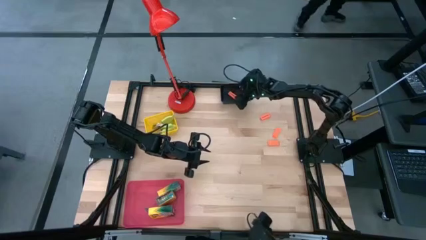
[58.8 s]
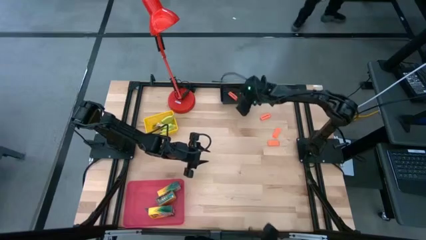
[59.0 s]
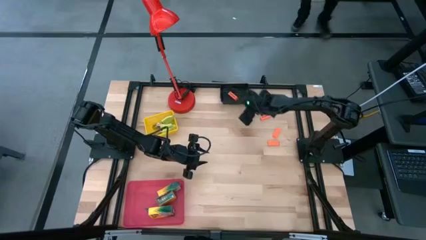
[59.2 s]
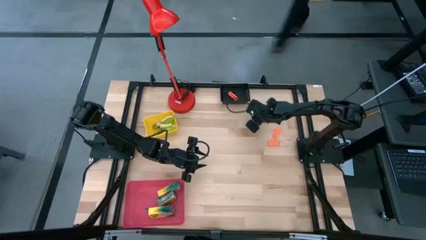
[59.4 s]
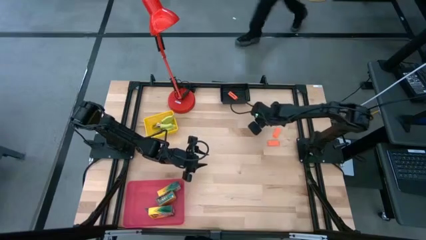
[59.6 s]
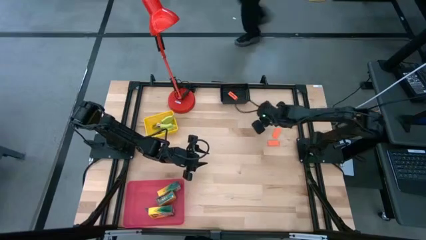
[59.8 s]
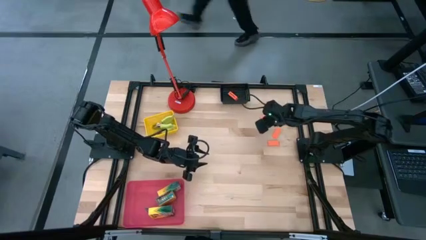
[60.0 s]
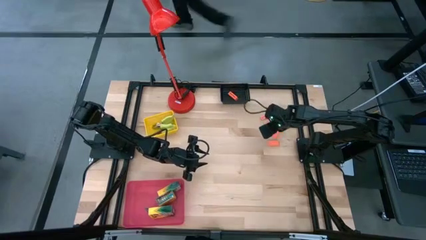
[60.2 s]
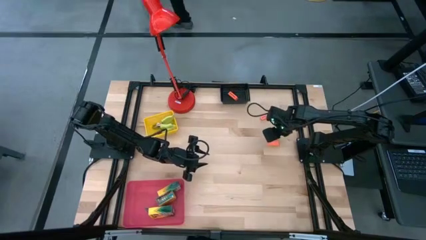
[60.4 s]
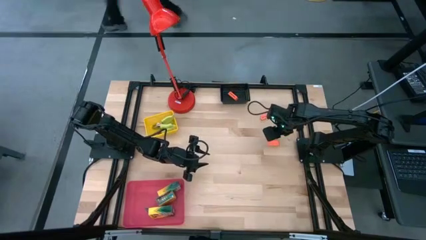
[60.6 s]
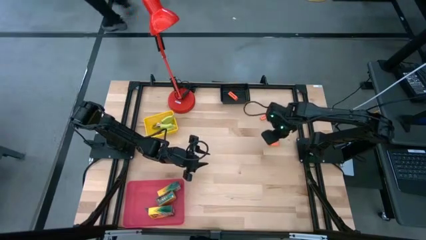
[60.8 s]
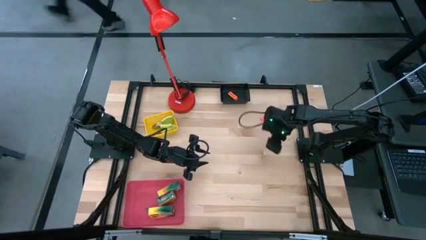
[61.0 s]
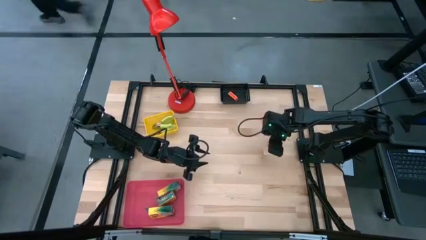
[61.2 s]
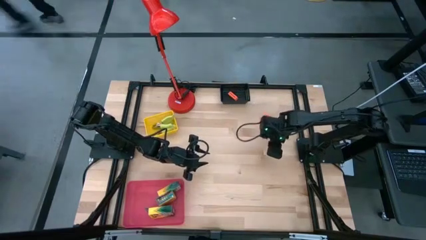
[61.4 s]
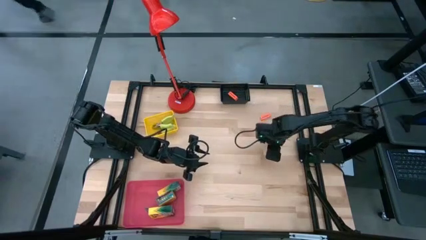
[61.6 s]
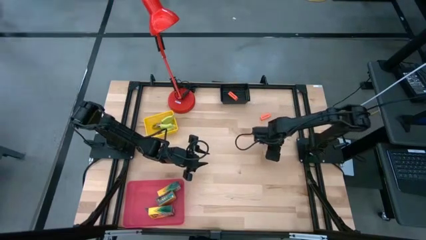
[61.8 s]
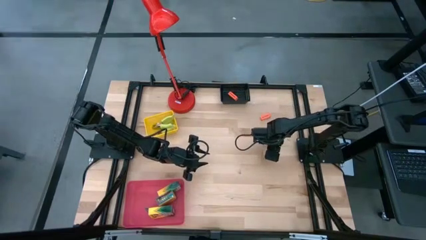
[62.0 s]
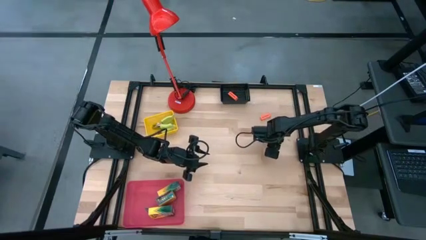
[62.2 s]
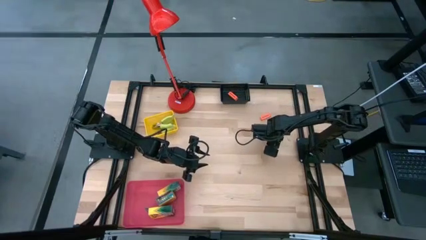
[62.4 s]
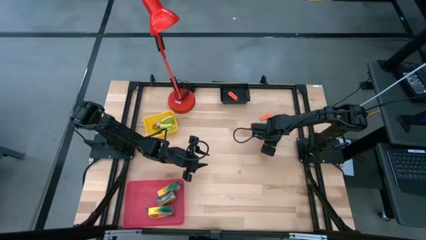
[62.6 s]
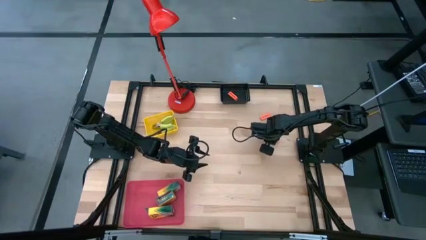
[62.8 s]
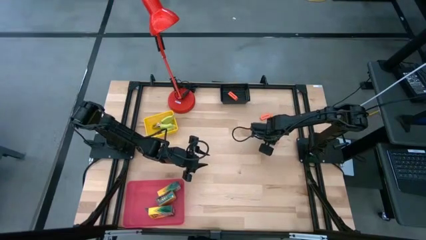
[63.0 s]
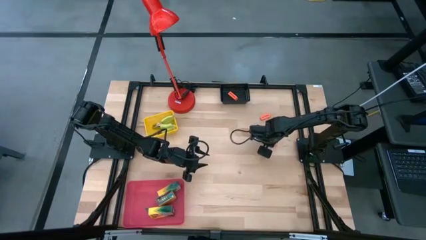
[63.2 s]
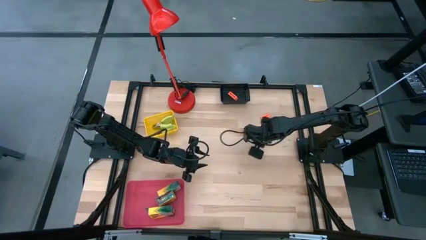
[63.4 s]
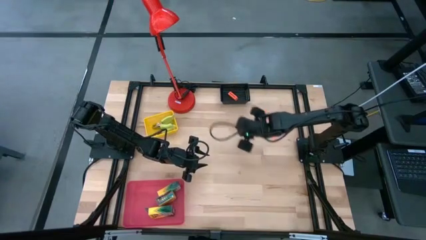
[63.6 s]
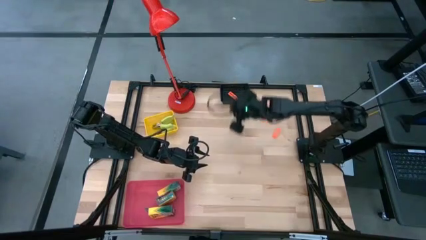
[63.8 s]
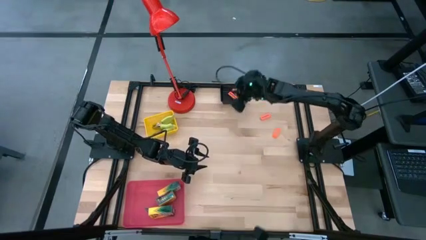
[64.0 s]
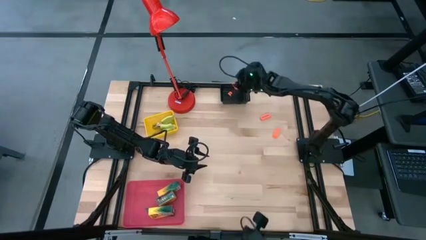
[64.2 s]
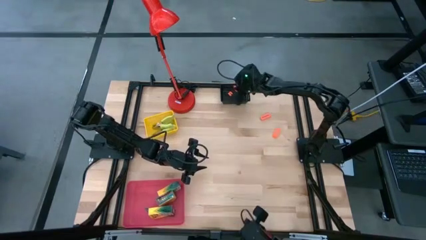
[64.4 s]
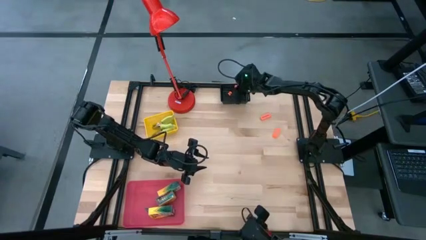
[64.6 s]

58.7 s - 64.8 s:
Task: Pick & Place School Supplies
Put the bottom eraser into the black bin

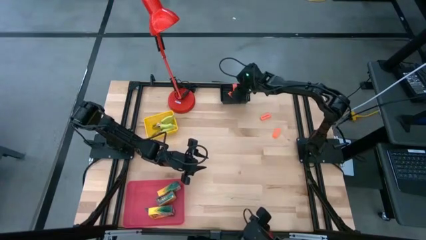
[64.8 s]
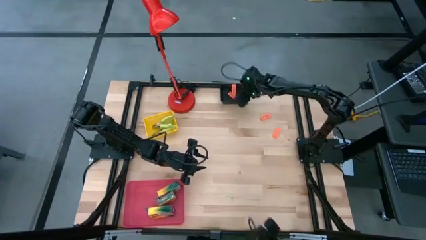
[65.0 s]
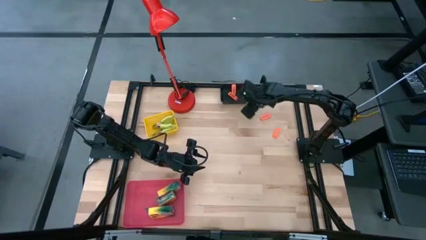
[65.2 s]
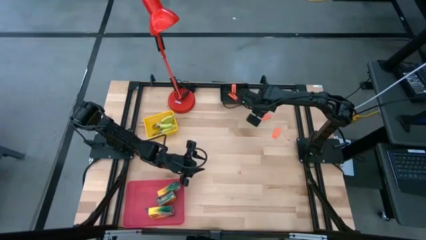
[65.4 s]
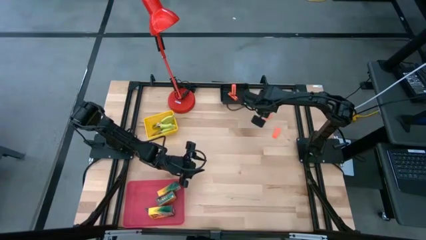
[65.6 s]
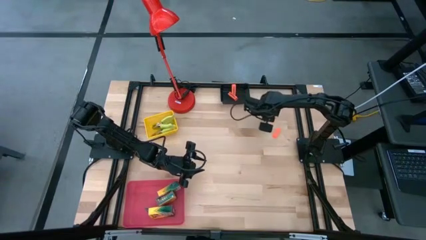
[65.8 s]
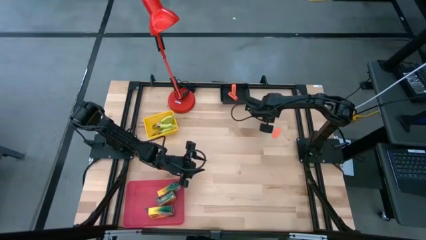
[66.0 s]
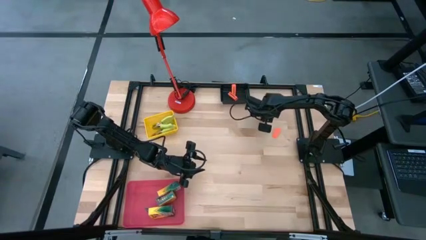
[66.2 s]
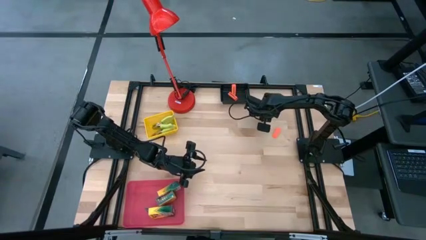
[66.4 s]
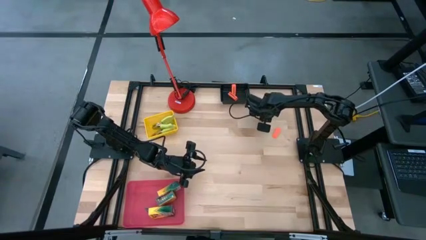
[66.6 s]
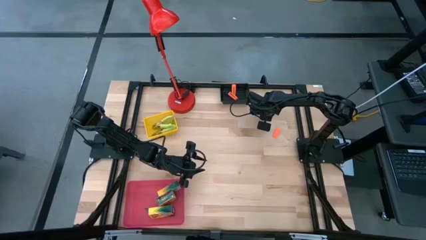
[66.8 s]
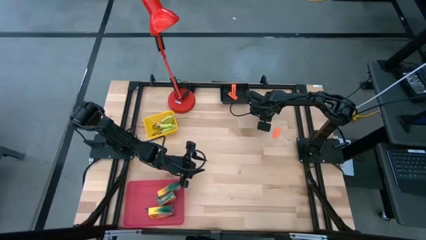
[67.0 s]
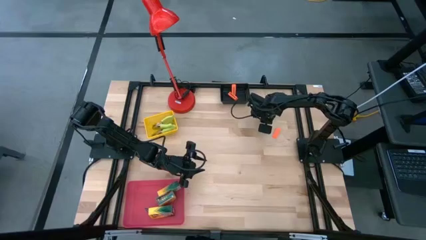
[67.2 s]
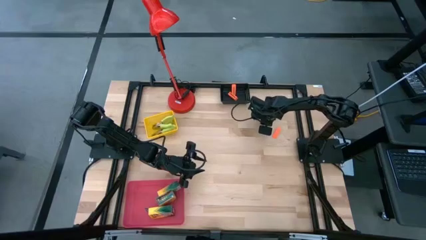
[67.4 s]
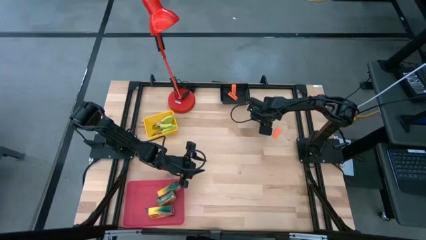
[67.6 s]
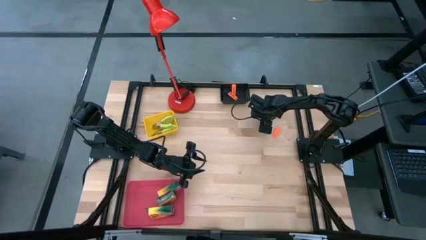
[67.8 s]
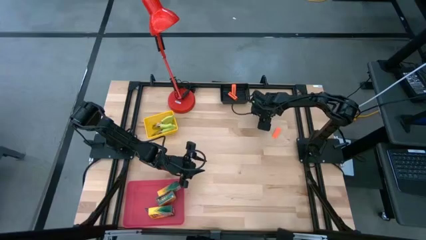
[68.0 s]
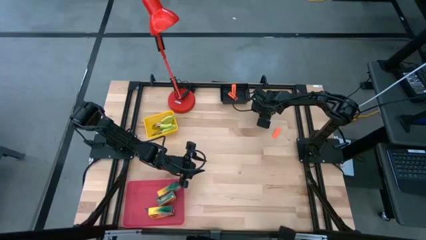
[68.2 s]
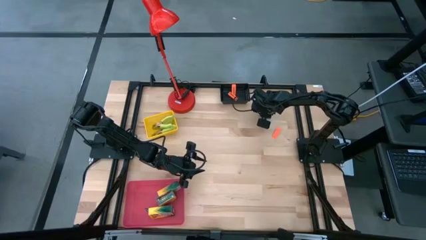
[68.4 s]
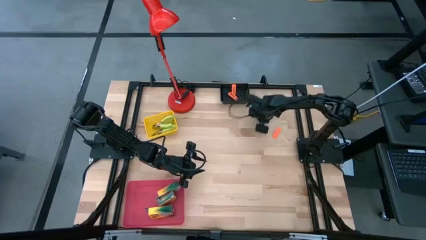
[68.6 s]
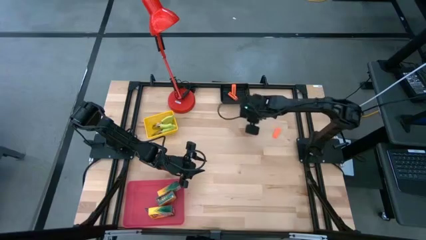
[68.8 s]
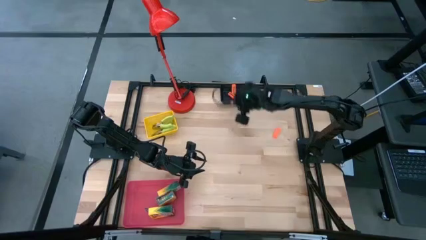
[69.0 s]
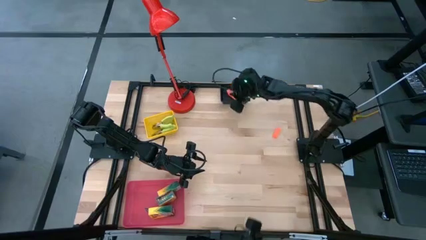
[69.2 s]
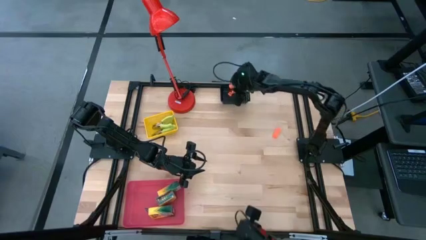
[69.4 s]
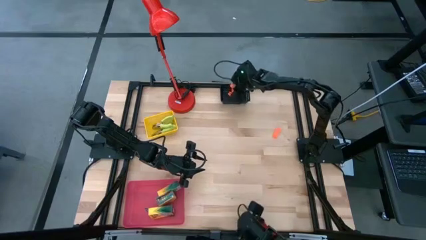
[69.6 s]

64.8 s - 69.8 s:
Put the top eraser into the black bin

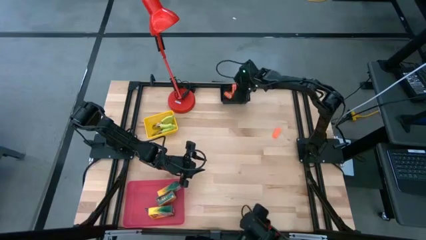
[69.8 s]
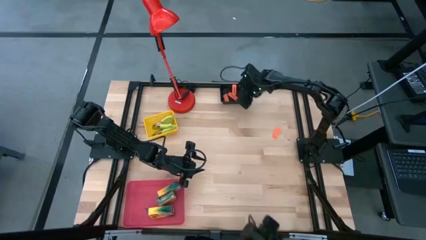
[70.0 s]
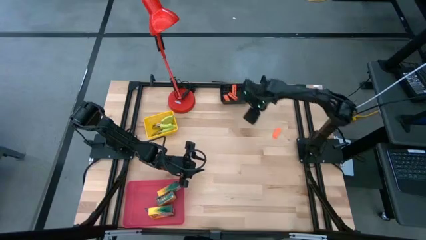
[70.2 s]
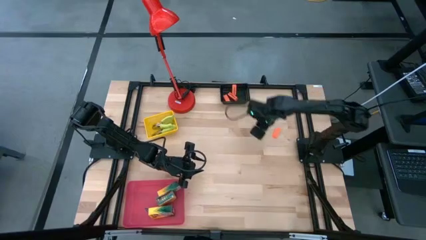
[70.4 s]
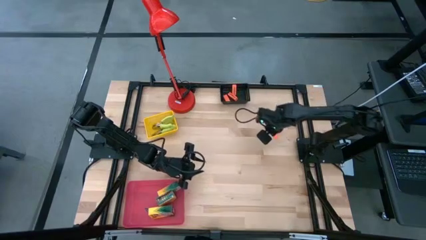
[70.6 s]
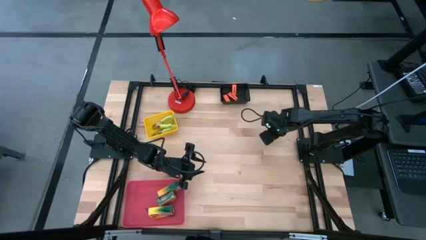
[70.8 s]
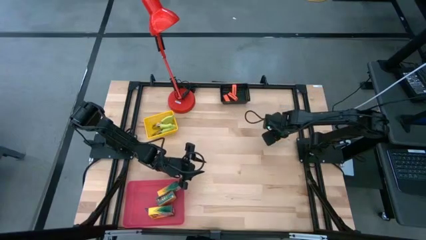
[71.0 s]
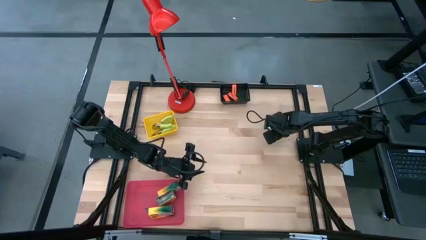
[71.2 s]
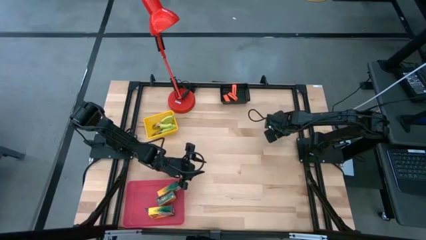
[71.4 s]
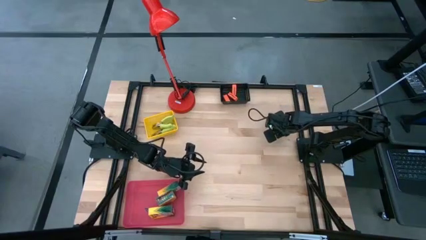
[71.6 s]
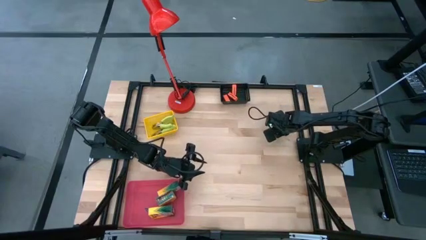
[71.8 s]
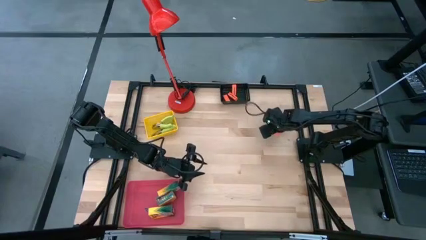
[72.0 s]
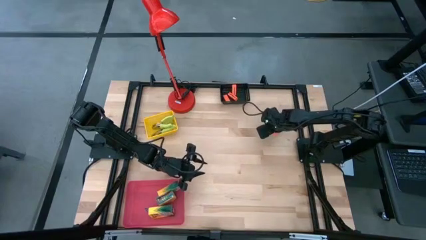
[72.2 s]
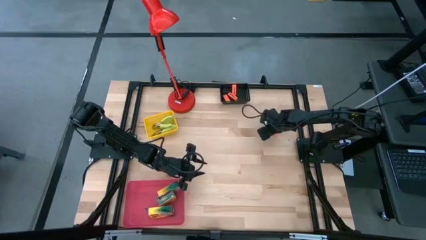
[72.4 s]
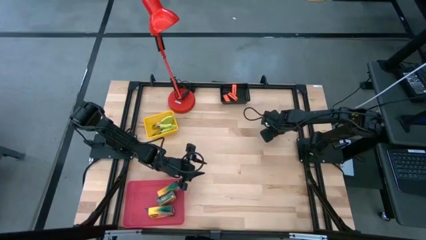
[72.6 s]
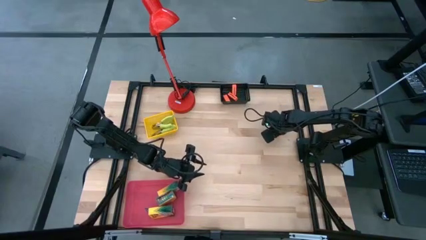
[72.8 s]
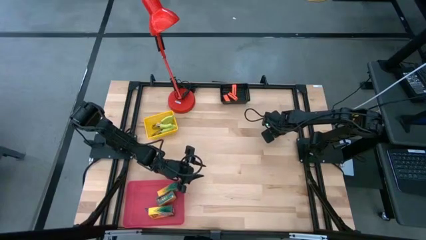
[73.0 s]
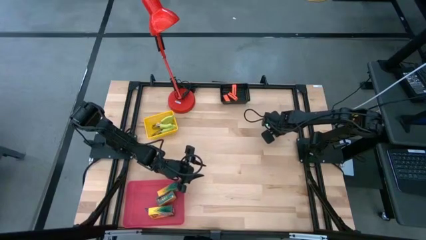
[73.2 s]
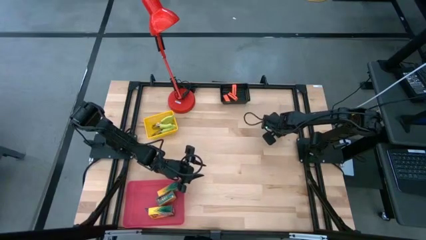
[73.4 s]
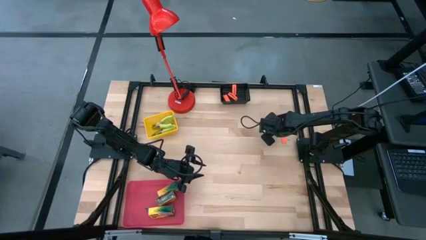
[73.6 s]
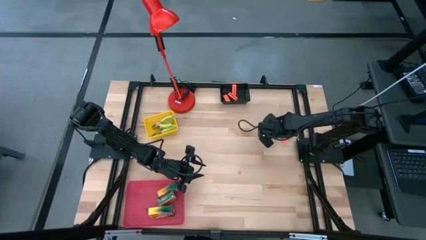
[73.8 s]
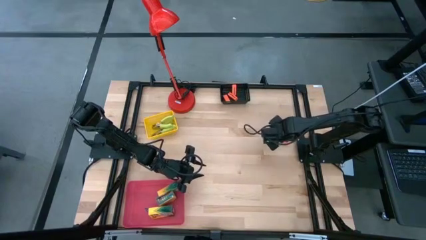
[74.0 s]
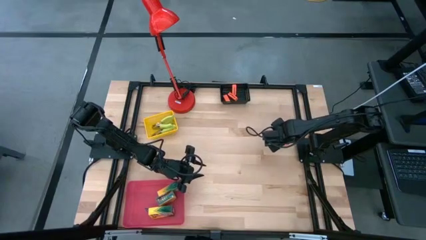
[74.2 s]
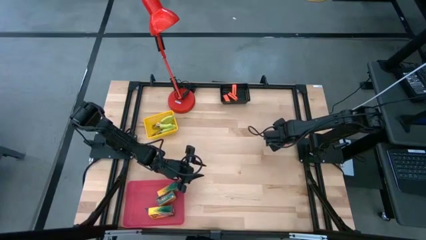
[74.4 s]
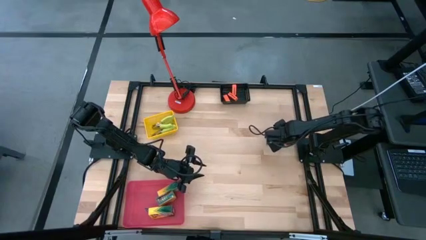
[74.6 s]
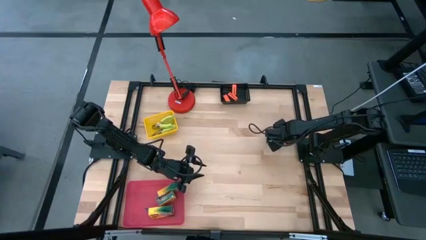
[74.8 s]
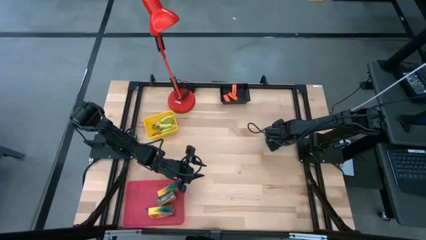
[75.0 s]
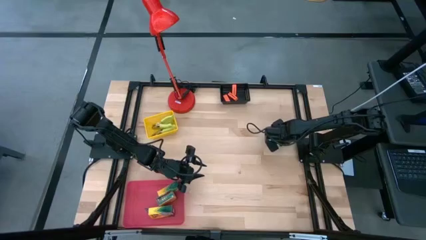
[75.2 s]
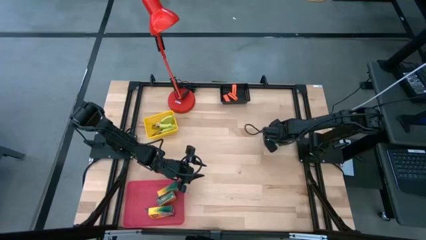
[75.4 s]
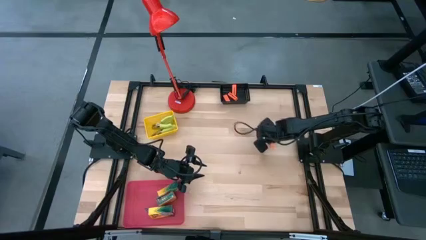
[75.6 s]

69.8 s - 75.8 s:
Put the eraser into the black bin
